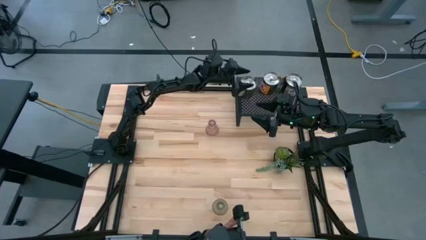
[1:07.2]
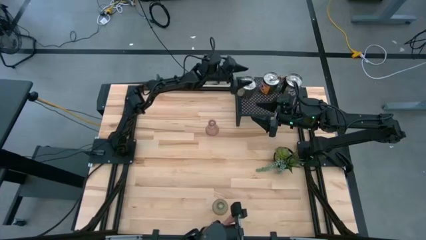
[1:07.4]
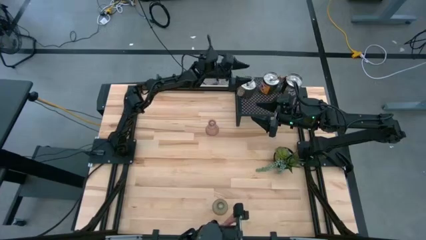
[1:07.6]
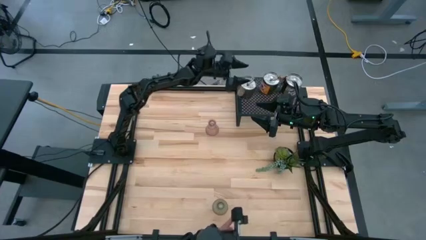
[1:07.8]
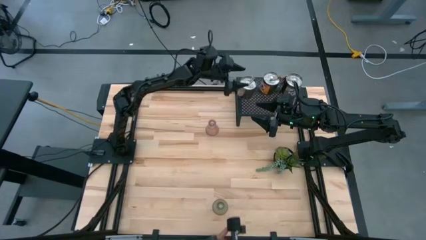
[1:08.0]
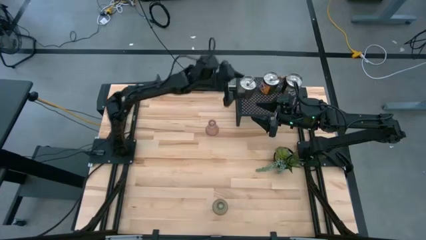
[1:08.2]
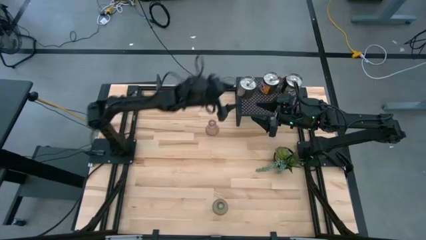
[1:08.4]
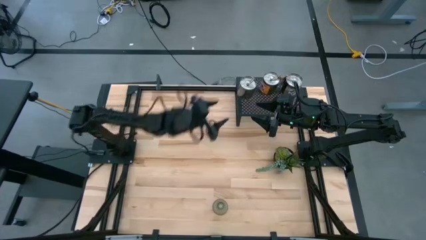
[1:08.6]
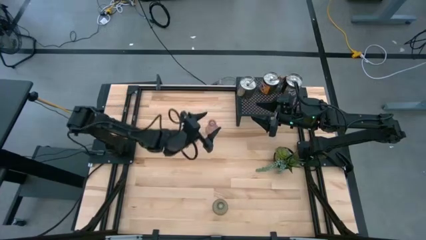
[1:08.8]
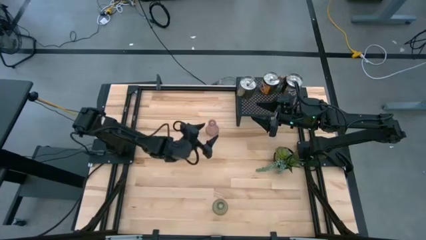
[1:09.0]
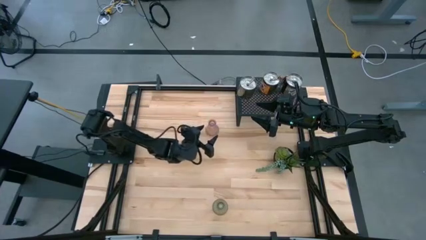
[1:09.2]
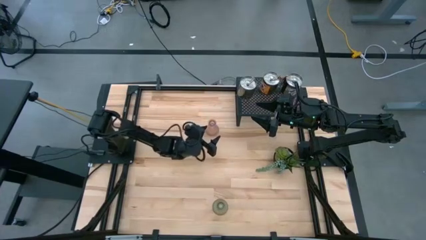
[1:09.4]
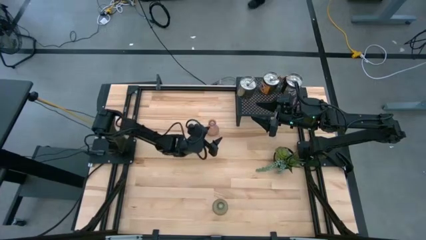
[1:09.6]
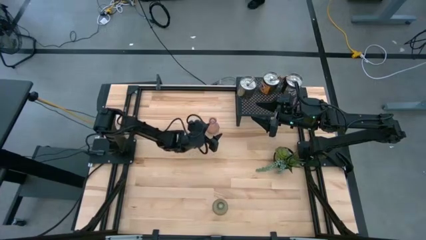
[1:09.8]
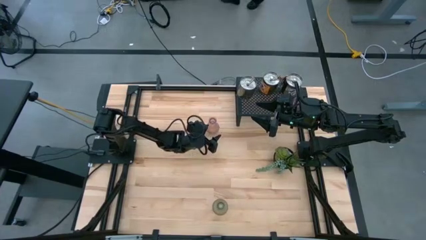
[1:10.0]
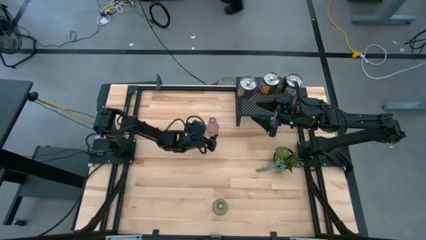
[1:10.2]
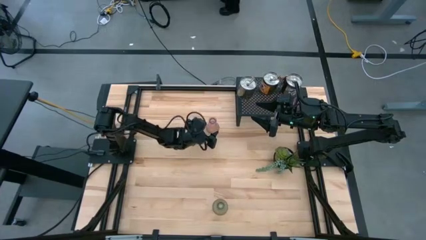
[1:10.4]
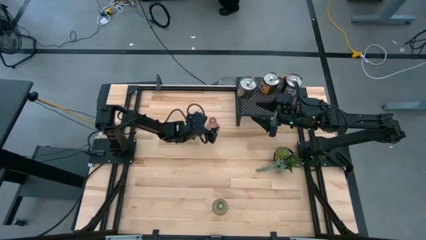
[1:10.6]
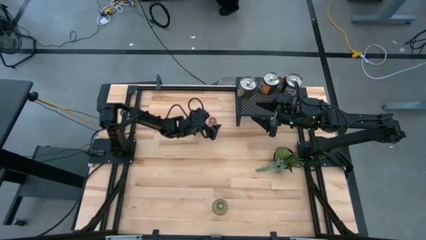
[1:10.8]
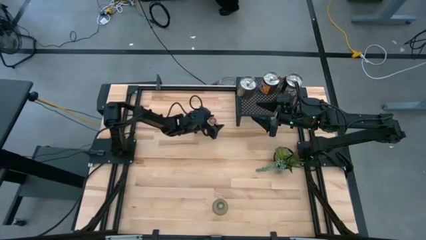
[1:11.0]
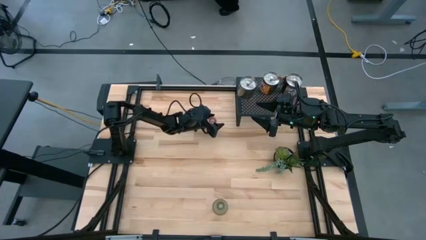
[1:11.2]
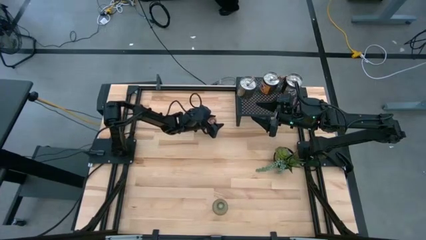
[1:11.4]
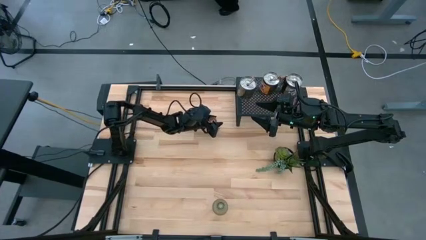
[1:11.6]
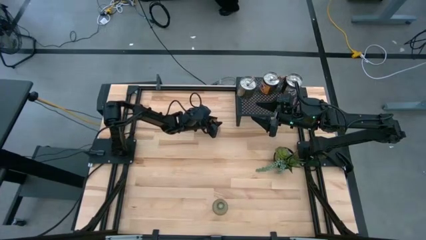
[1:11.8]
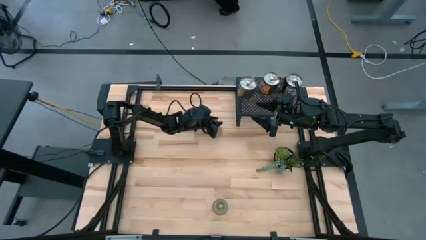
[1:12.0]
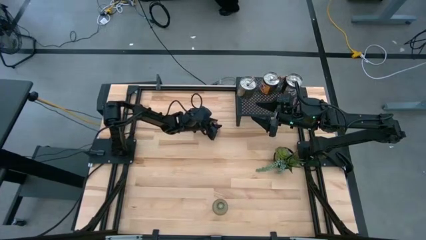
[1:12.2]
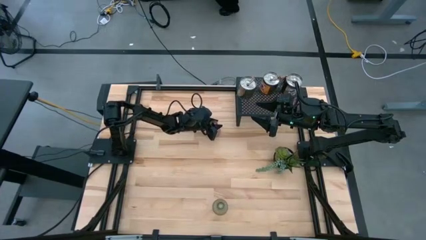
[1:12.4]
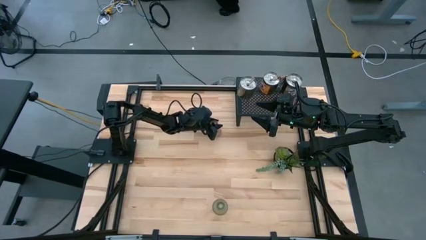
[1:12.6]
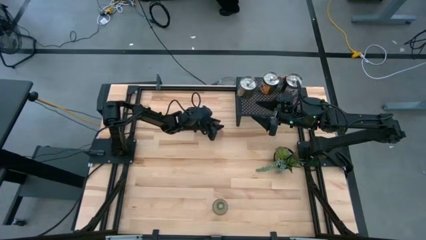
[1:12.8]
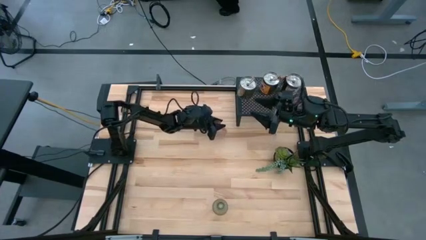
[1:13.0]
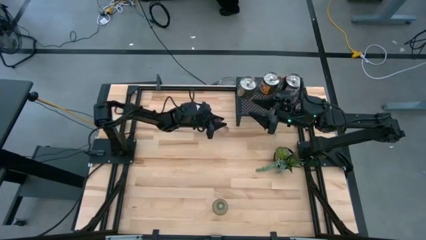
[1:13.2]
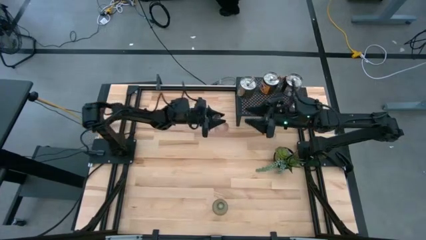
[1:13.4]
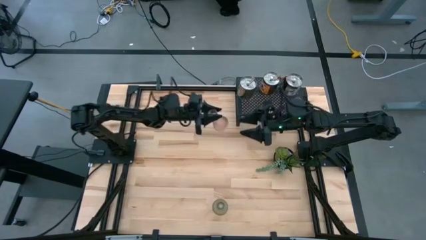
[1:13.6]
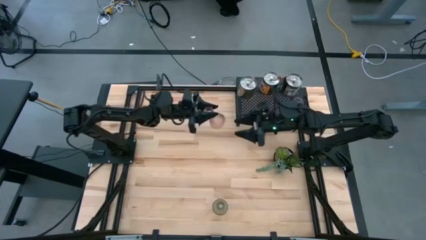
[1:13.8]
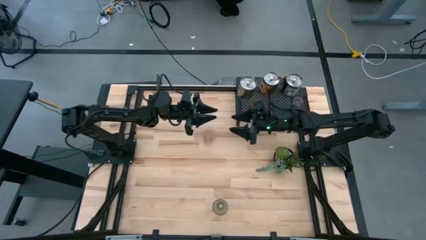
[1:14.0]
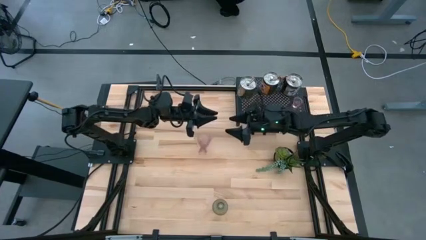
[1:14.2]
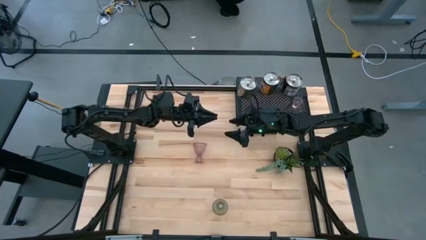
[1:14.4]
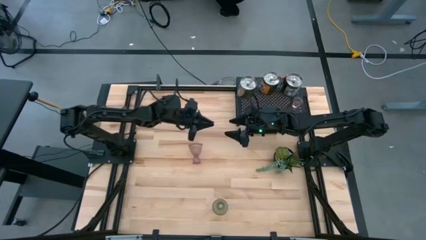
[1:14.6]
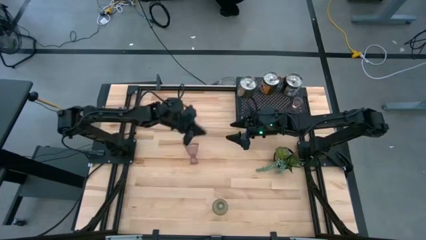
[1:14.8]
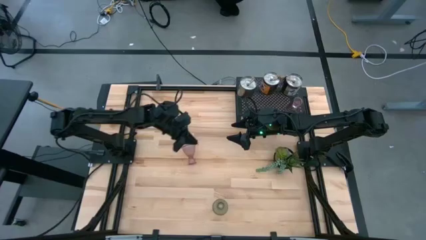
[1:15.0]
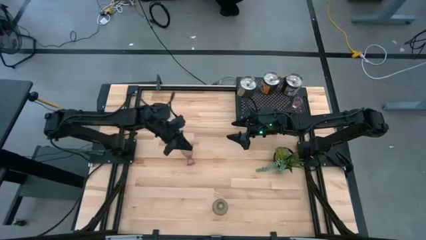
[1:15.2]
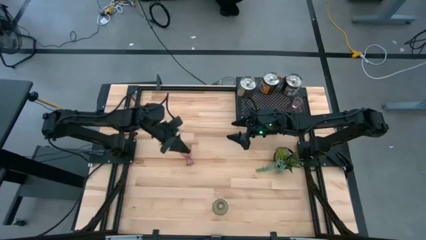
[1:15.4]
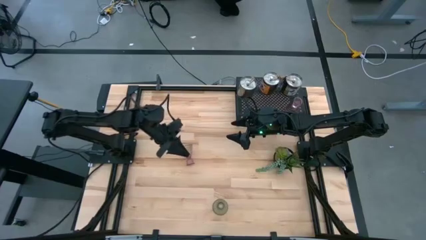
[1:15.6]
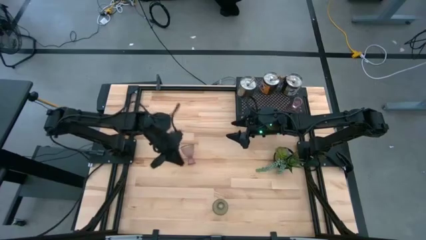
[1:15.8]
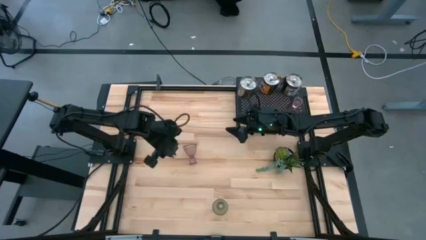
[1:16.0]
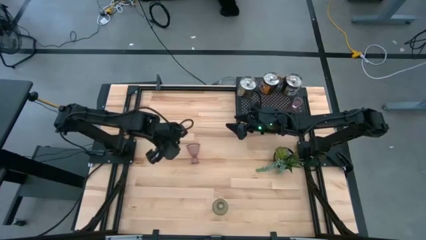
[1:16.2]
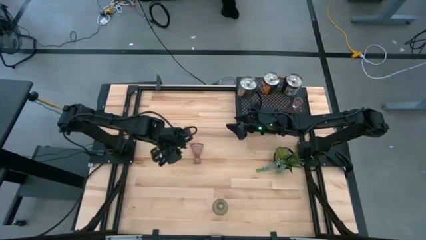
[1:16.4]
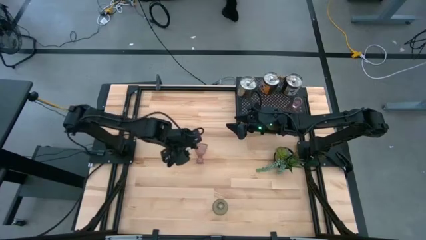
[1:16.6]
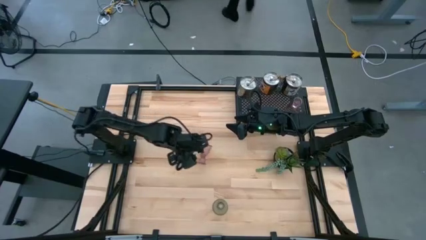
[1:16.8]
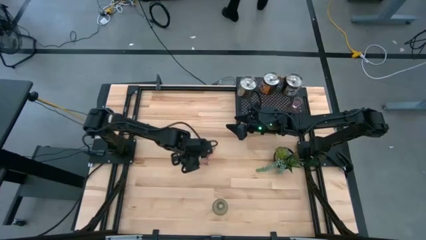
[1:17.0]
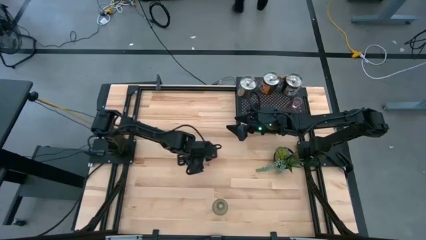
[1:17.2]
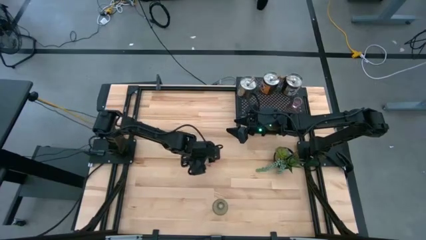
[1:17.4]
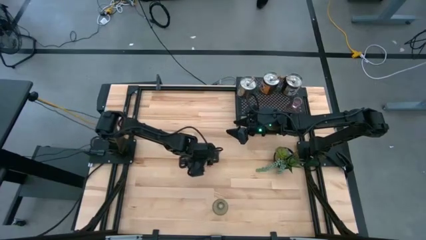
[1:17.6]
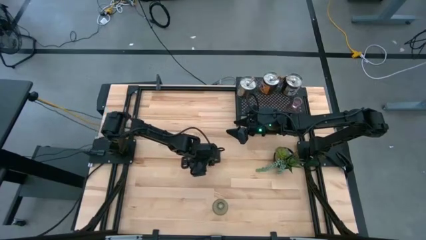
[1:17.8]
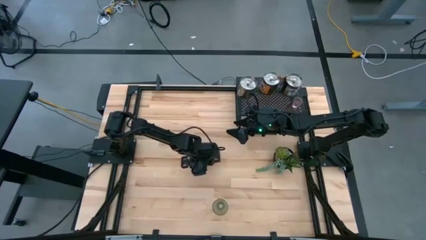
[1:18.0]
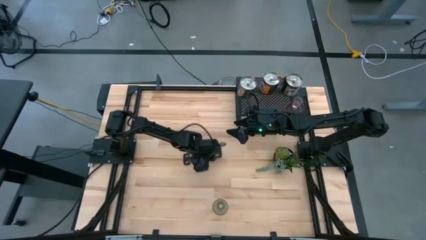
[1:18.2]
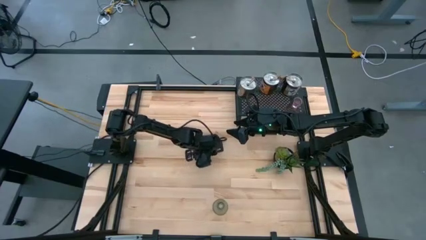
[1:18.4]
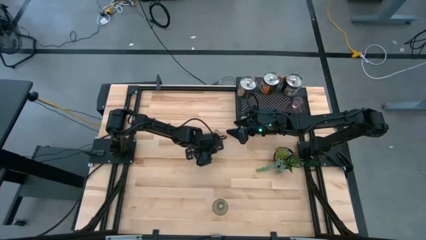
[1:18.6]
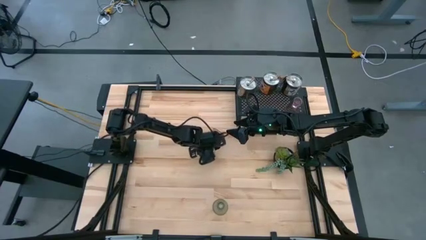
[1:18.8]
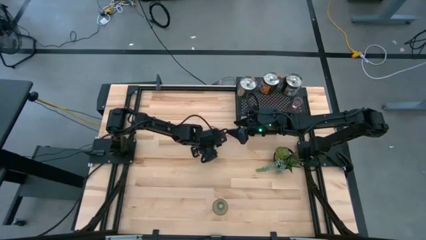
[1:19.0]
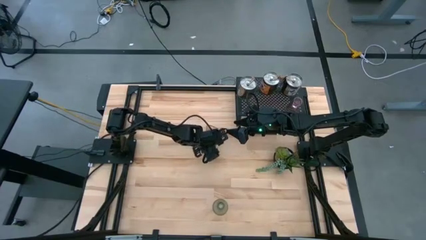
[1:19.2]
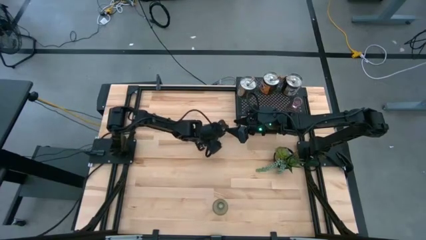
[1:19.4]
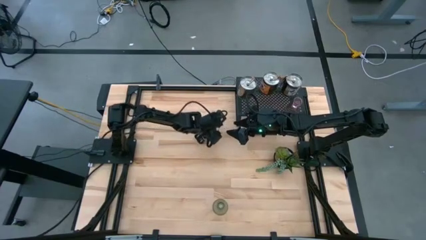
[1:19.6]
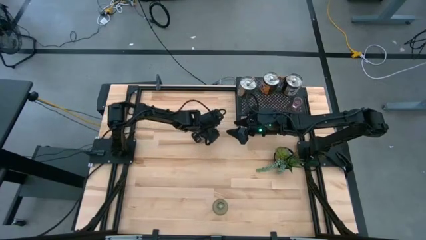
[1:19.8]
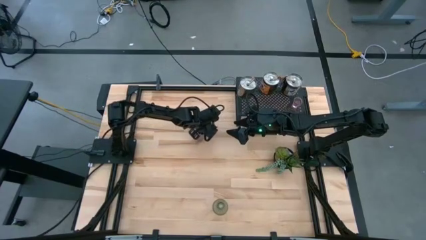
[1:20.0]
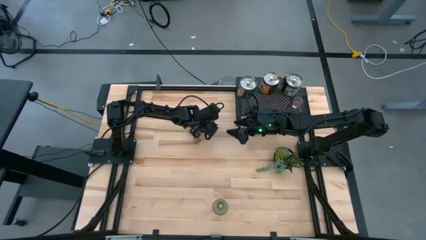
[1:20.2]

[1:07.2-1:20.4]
Task: Pick & Place candle stick holders
Put the pink candle holder on the shelf aligned with the pink candle holder
